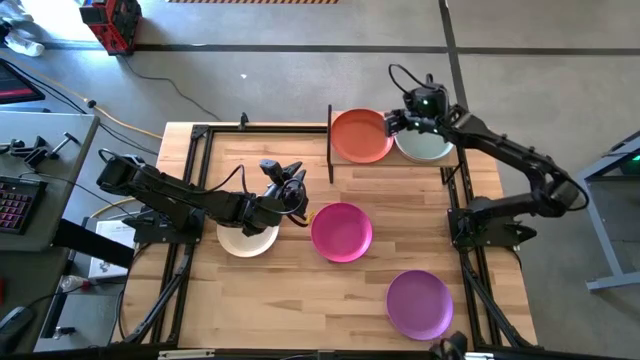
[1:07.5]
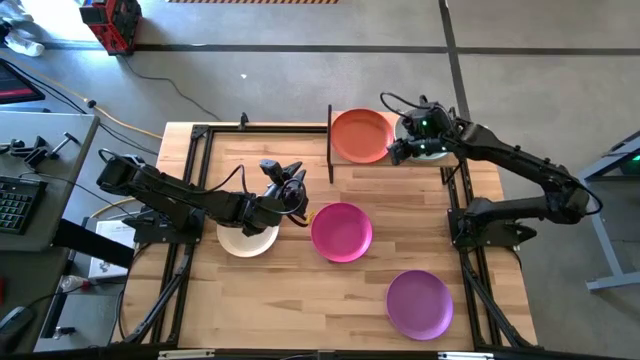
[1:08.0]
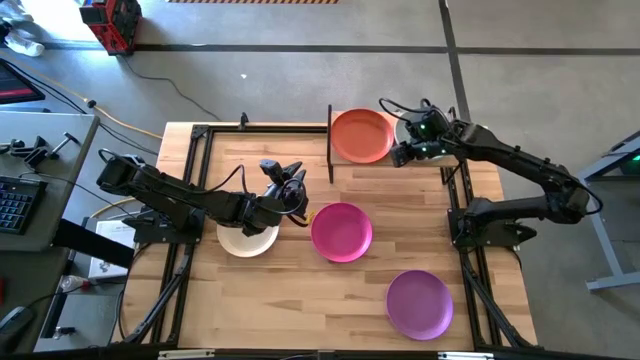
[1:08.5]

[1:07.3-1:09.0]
Task: Place and stack plates onto a shelf
Adjust the stacked plates on the shelf

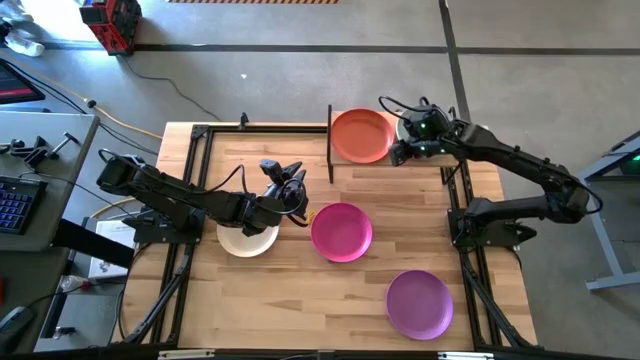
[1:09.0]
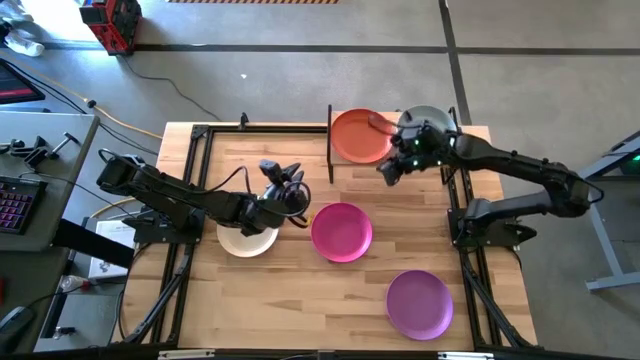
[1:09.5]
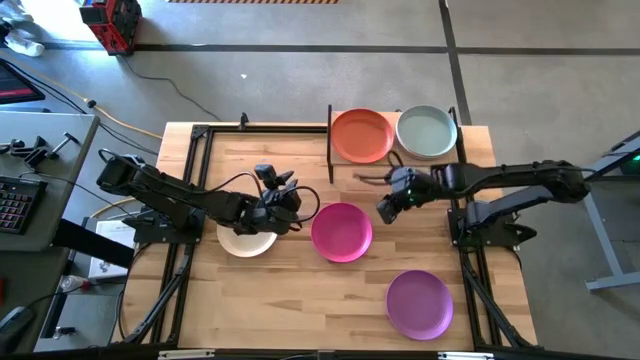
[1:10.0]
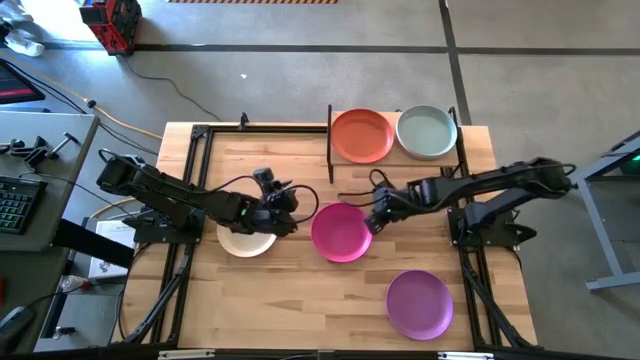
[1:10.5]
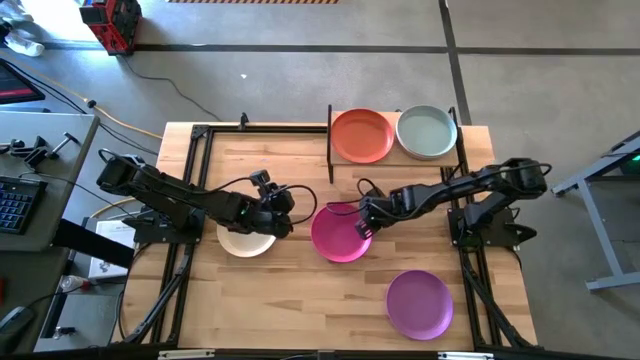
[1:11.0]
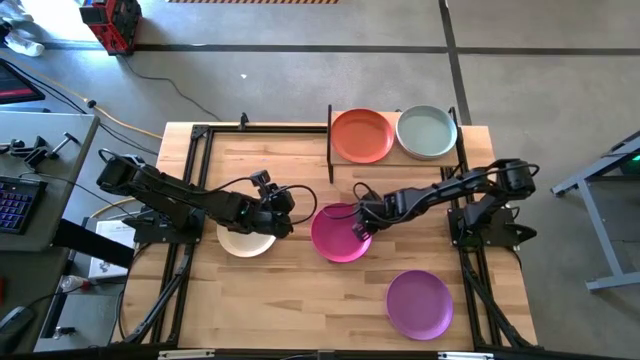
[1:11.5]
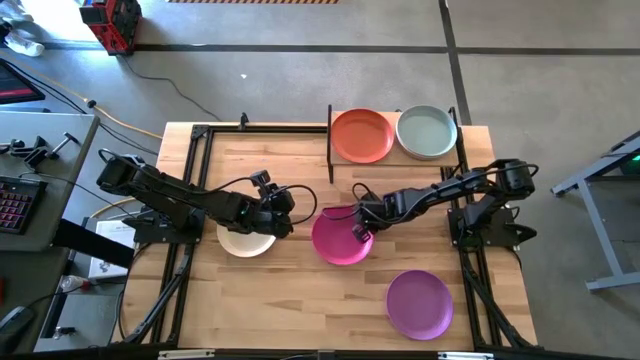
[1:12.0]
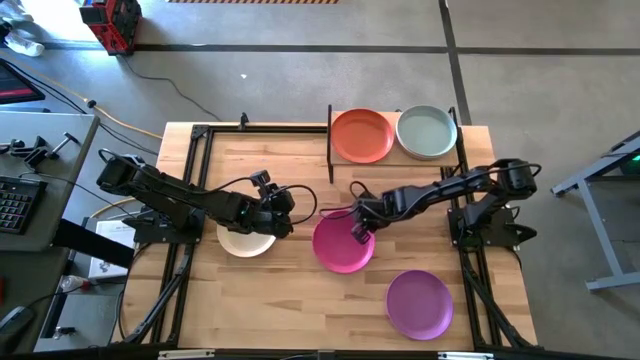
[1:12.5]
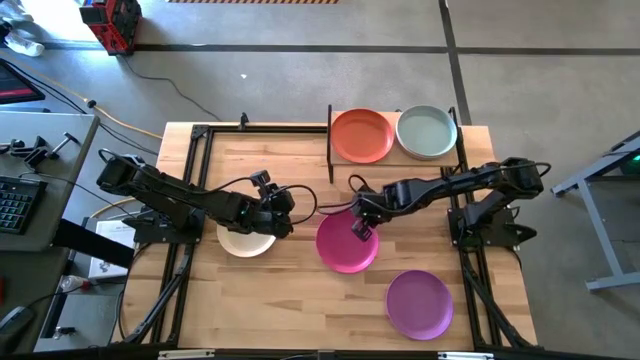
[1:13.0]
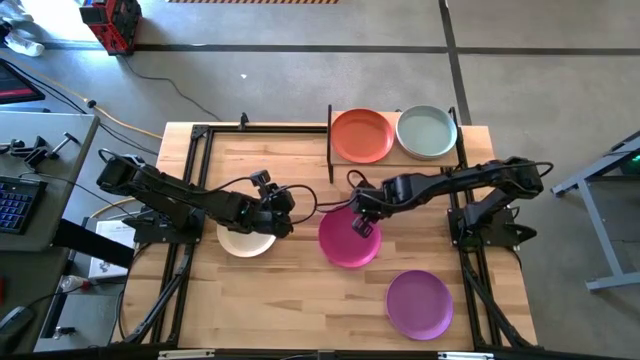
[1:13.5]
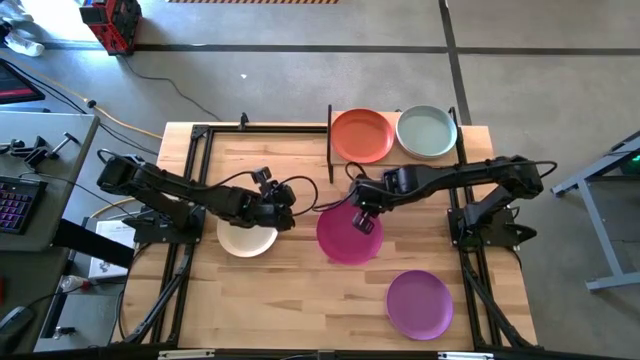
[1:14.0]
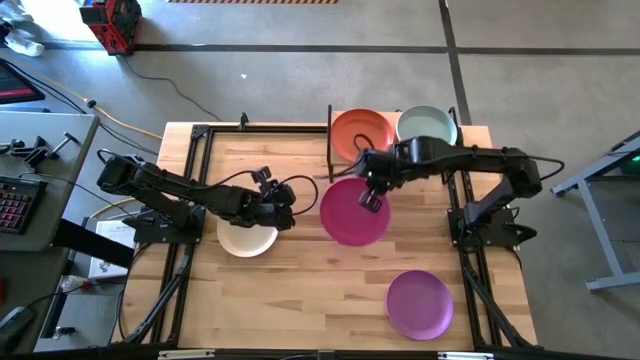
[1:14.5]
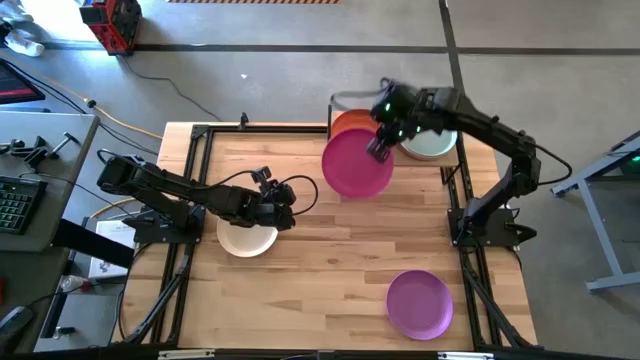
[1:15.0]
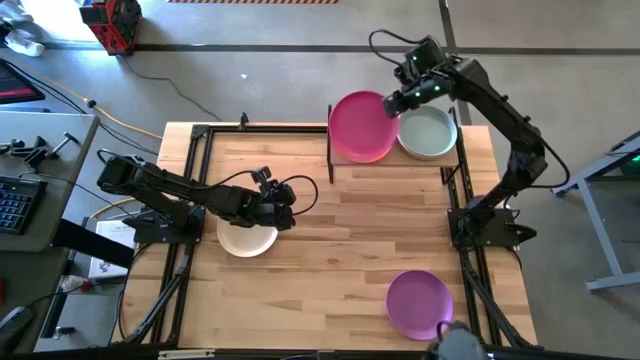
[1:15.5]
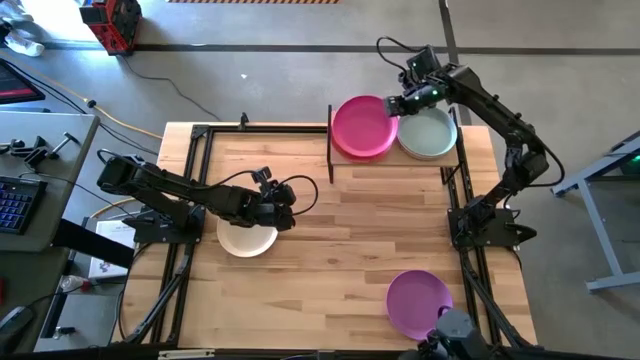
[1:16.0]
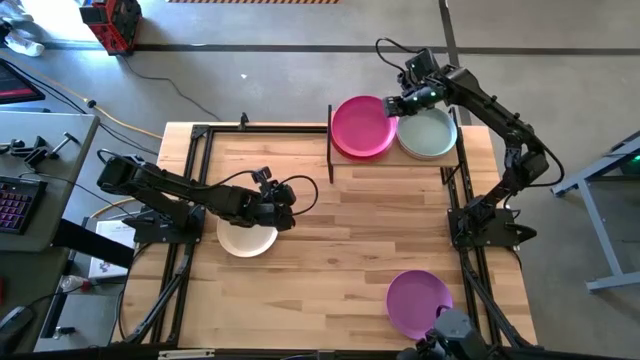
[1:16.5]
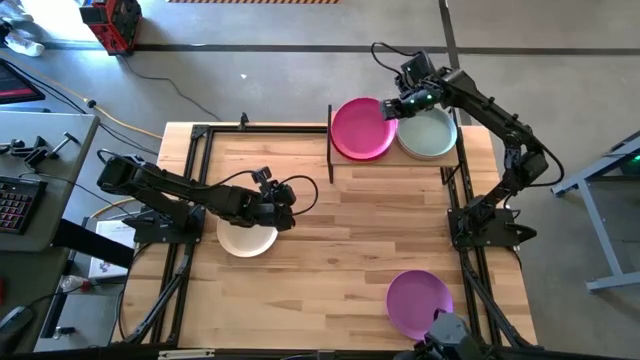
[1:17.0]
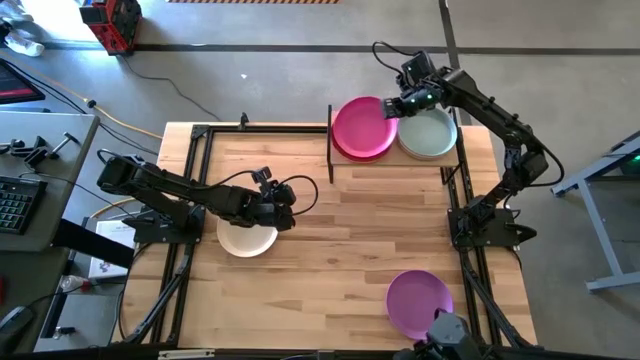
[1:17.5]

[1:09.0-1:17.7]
Stack the dark pink plate on top of the orange plate on the shelf

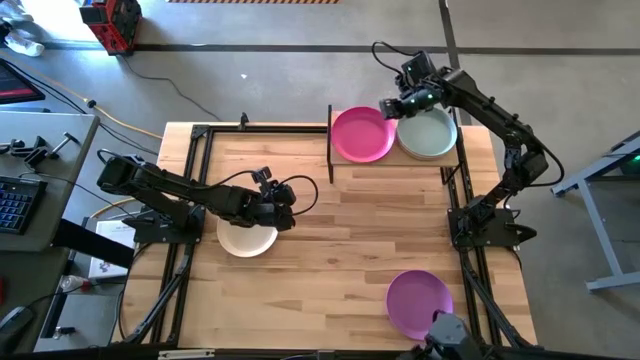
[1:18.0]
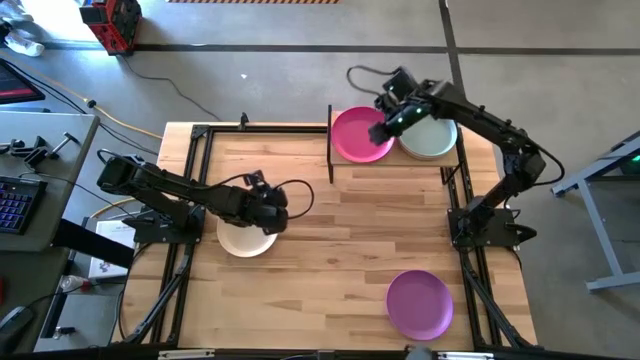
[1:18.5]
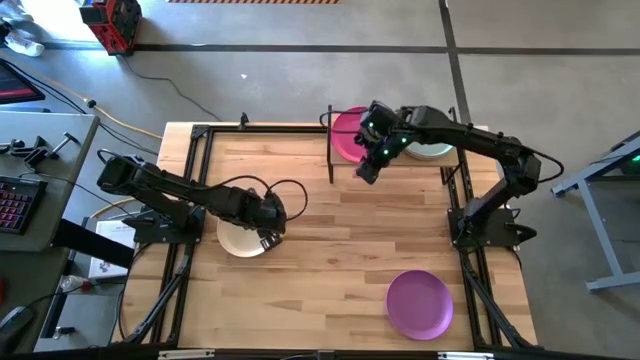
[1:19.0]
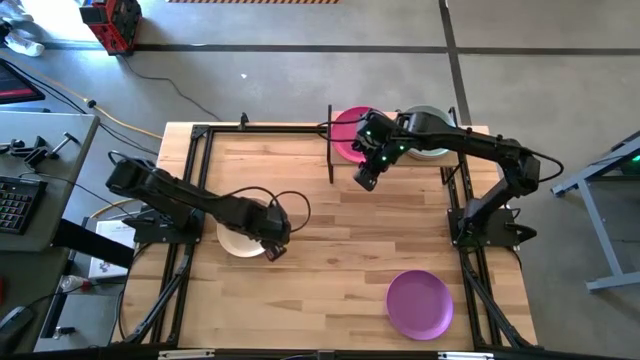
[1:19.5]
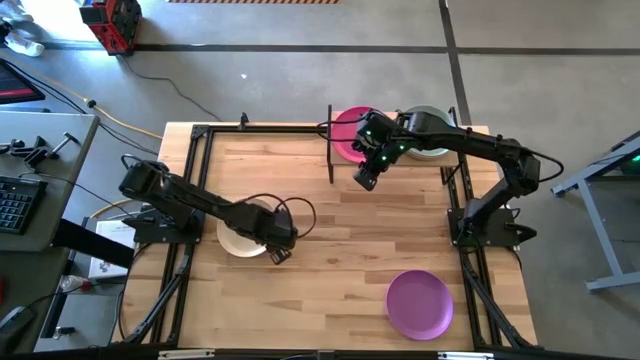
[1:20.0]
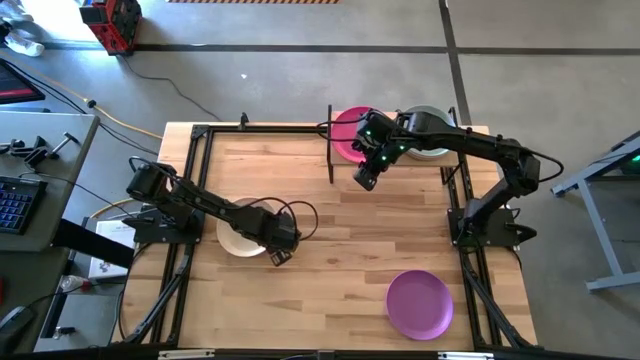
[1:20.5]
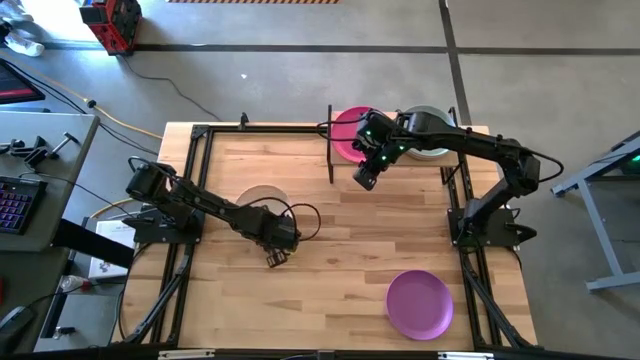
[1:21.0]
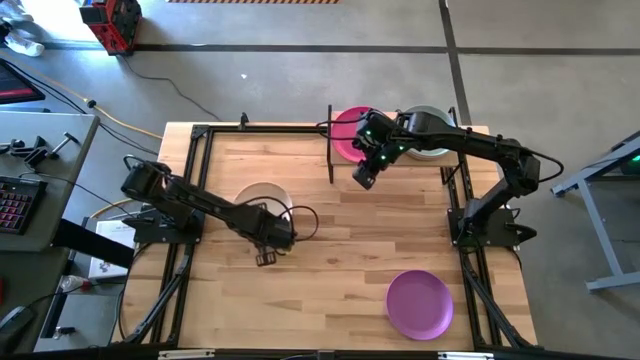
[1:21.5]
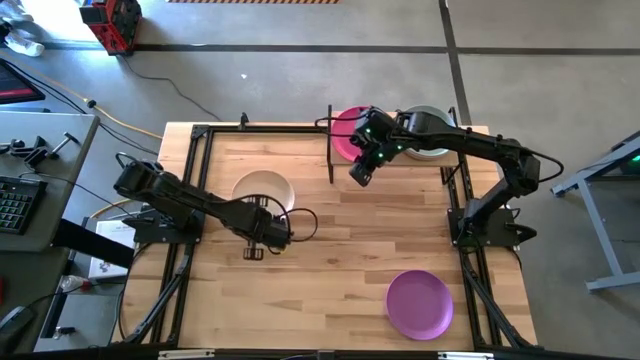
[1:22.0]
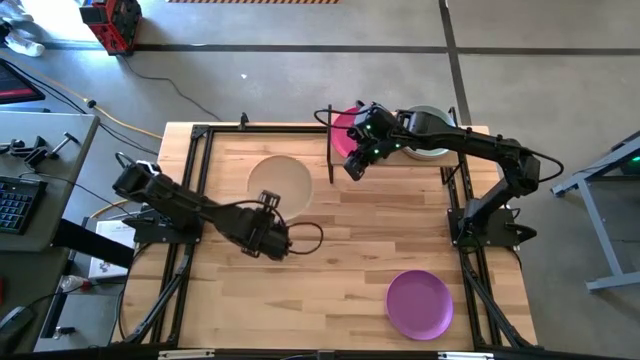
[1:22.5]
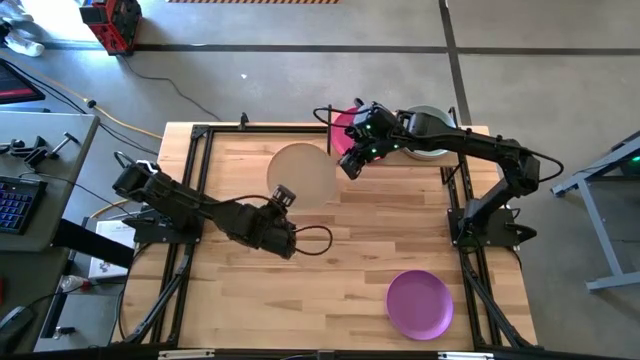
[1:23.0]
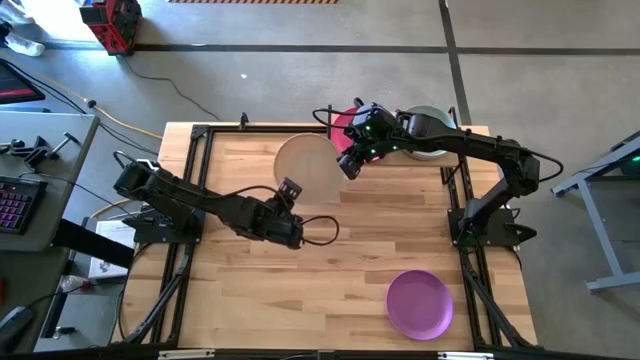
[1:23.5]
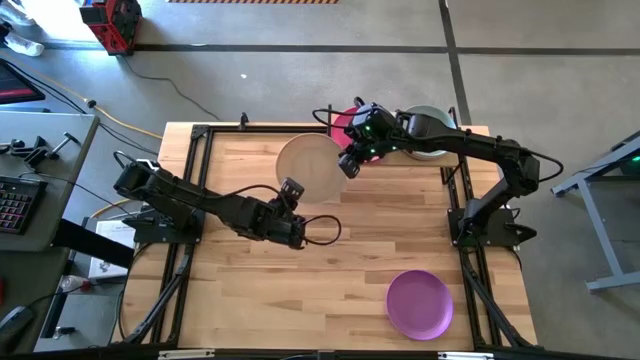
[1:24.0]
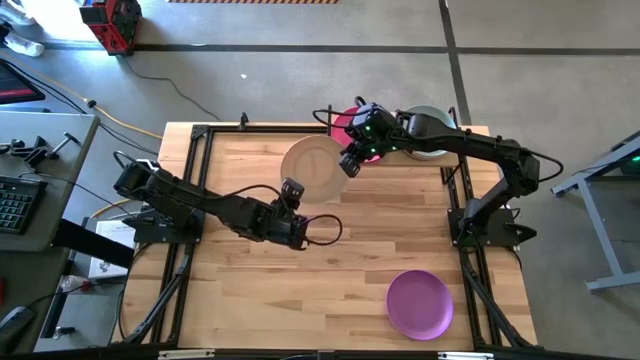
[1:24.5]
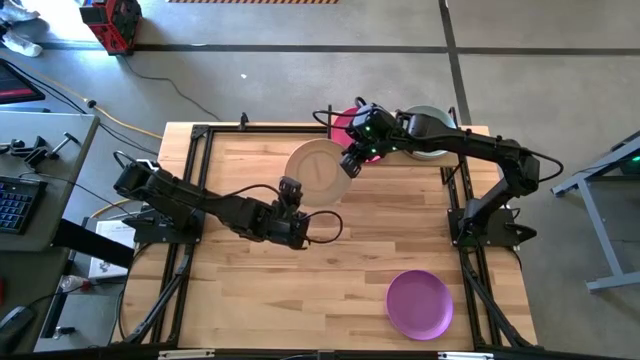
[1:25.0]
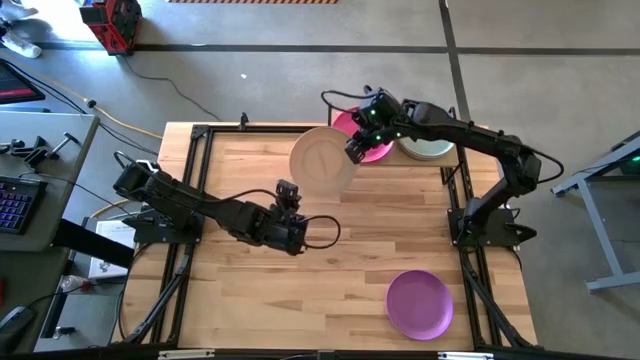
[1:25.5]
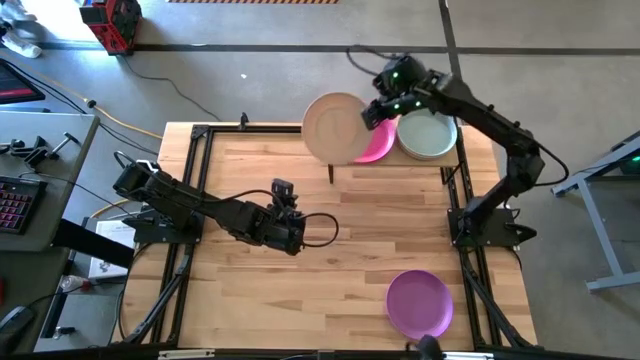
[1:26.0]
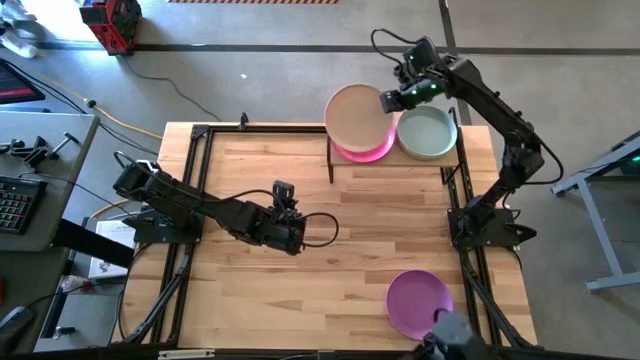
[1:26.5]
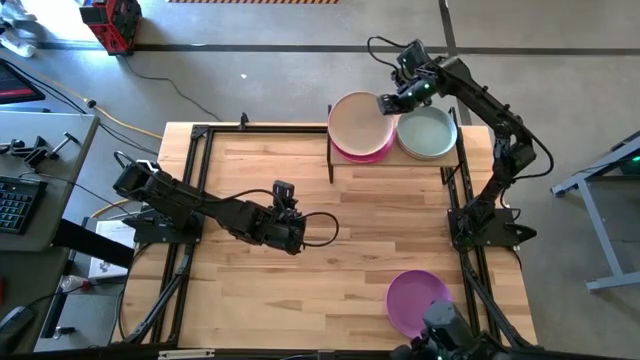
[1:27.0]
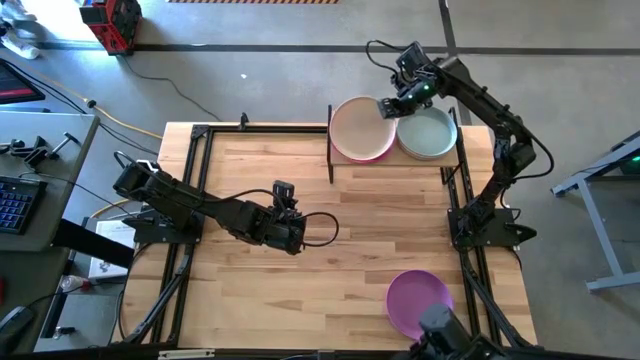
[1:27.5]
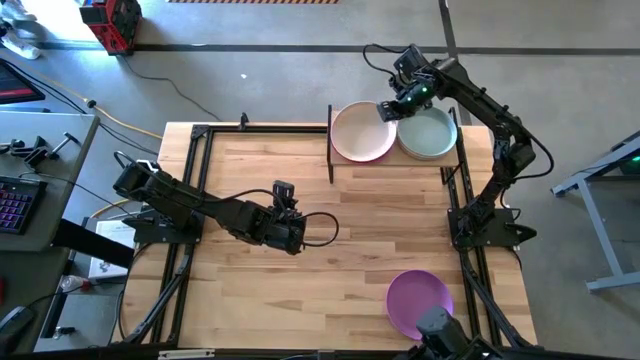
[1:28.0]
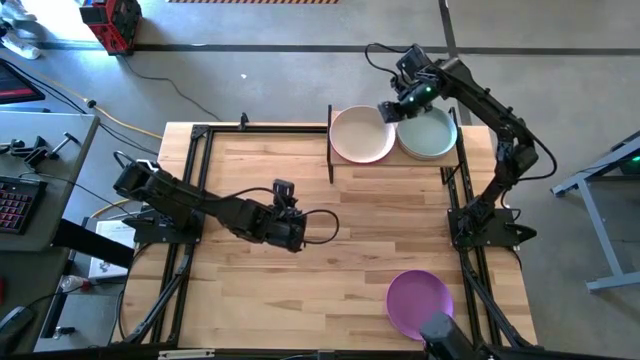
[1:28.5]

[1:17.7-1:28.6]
Stack the white on top of the dark pink plate on the shelf
